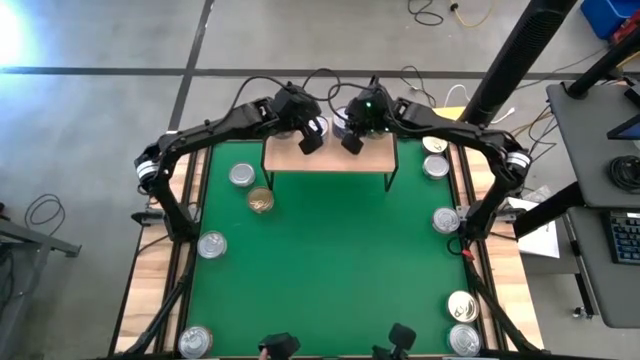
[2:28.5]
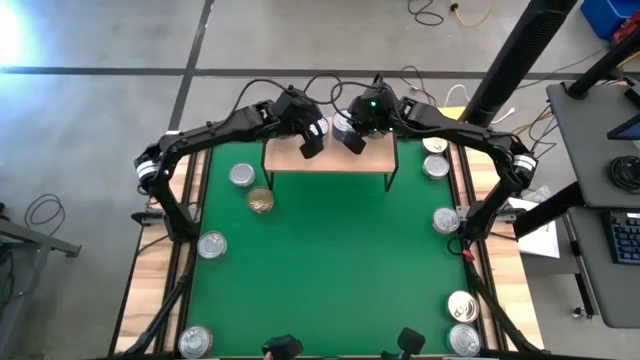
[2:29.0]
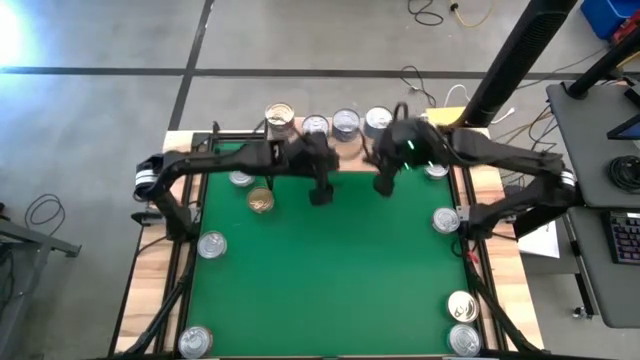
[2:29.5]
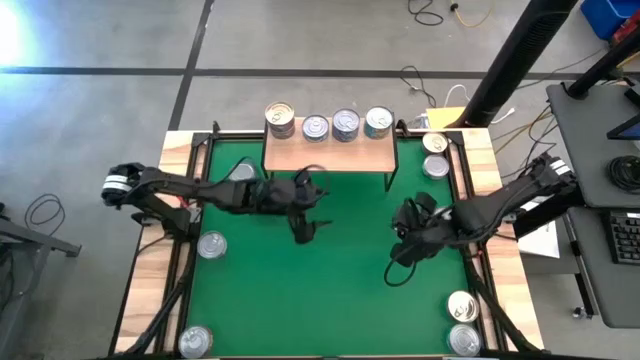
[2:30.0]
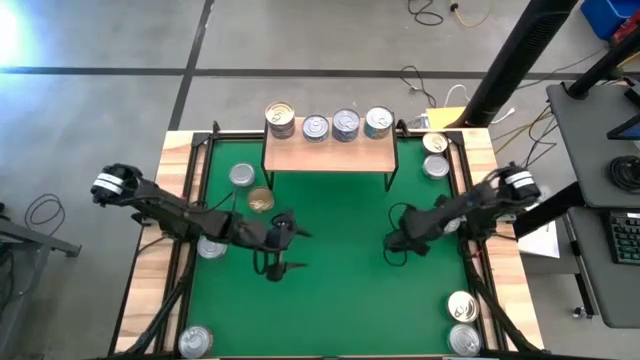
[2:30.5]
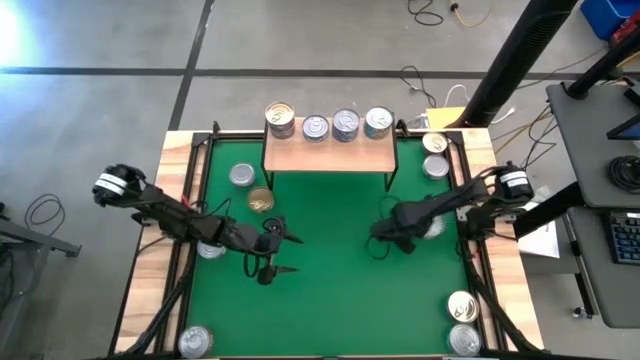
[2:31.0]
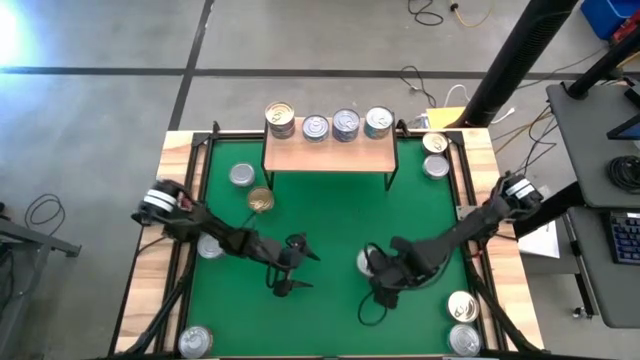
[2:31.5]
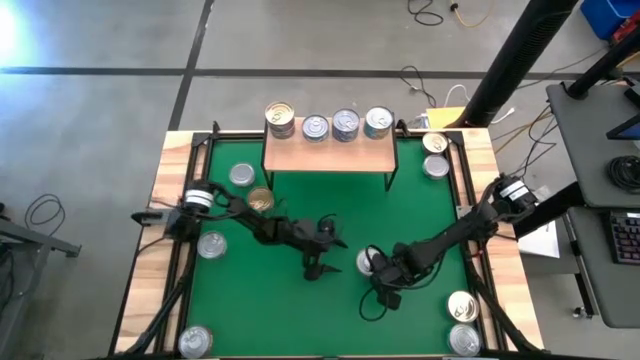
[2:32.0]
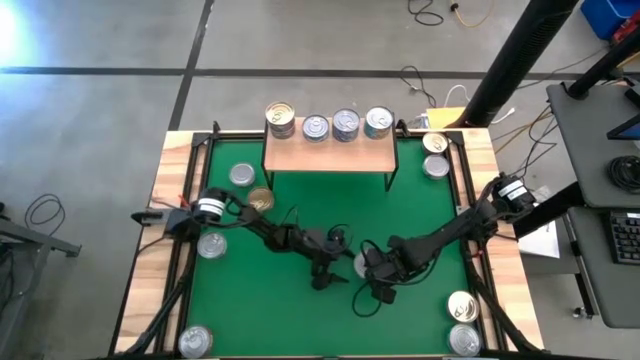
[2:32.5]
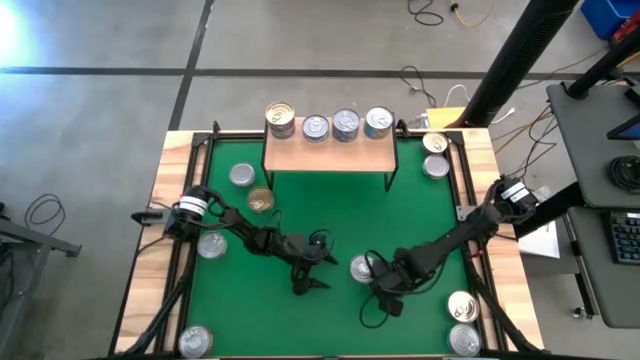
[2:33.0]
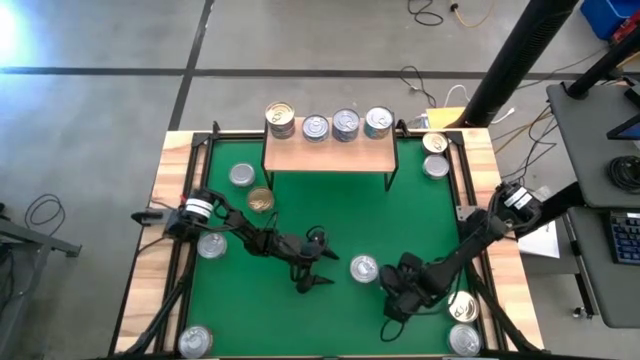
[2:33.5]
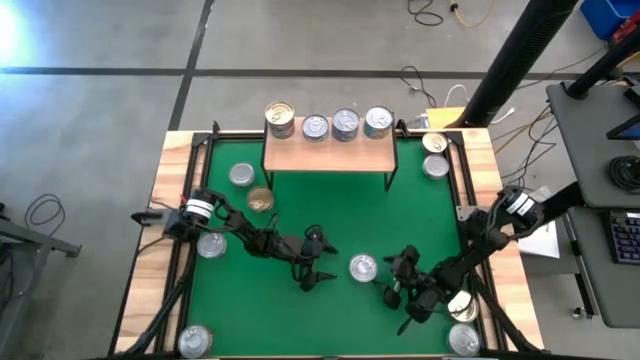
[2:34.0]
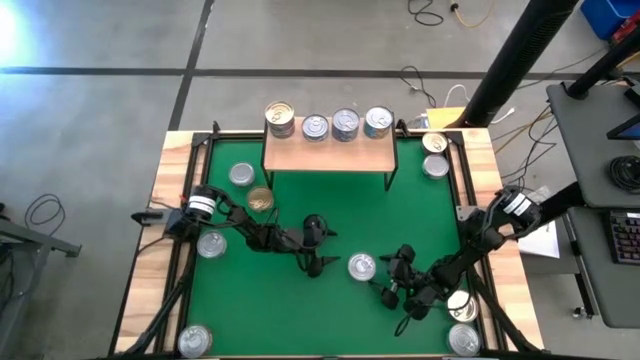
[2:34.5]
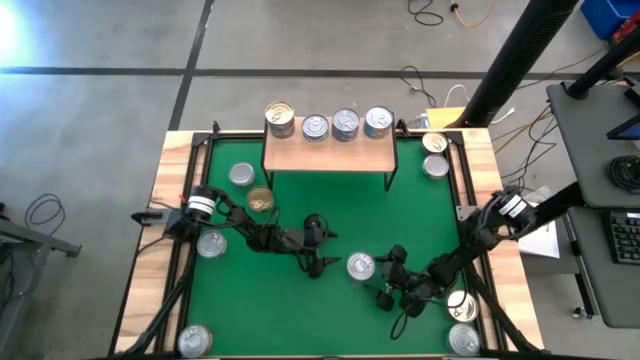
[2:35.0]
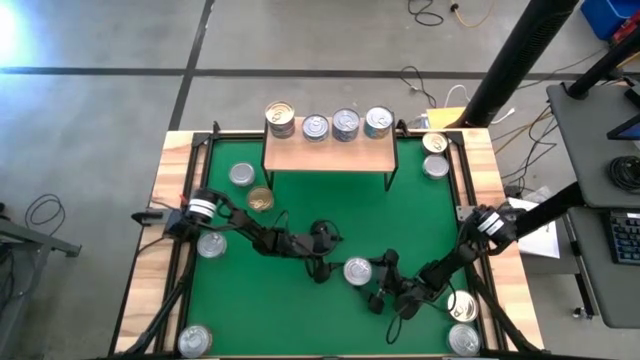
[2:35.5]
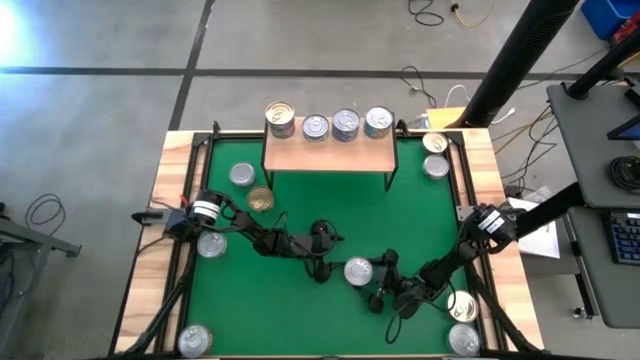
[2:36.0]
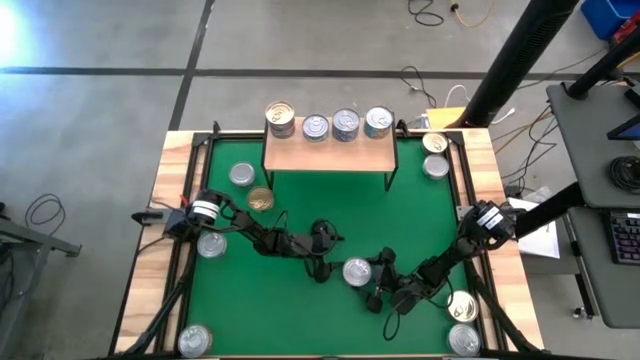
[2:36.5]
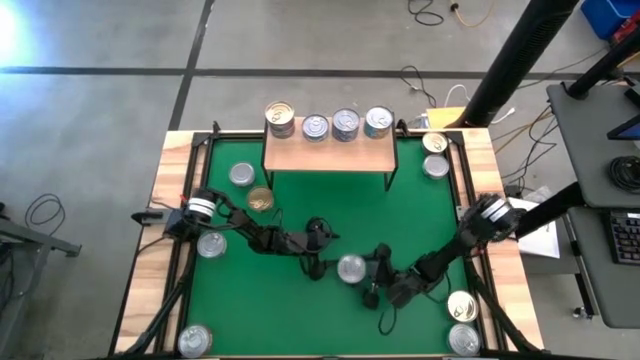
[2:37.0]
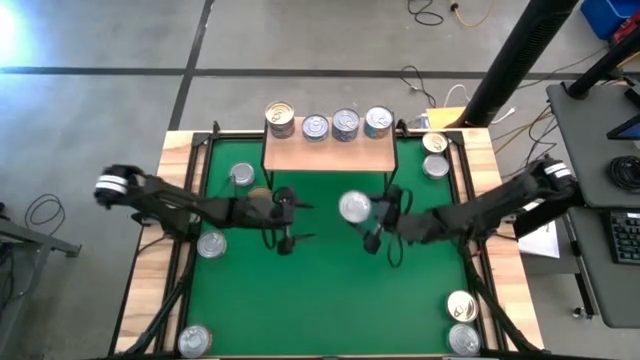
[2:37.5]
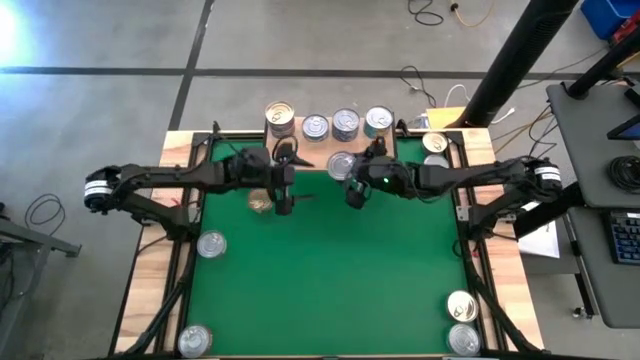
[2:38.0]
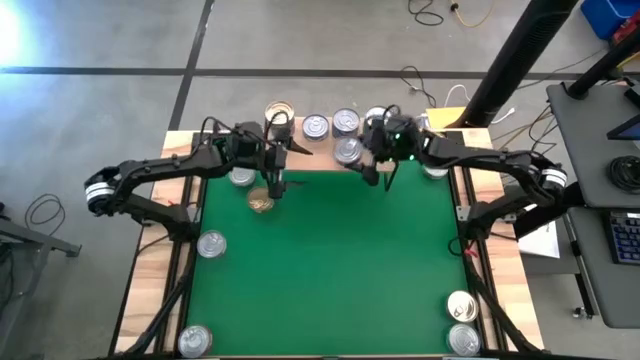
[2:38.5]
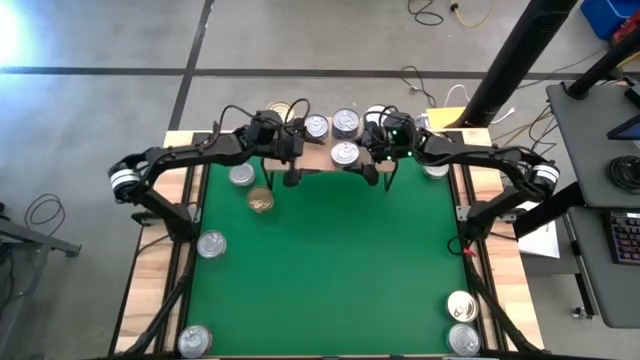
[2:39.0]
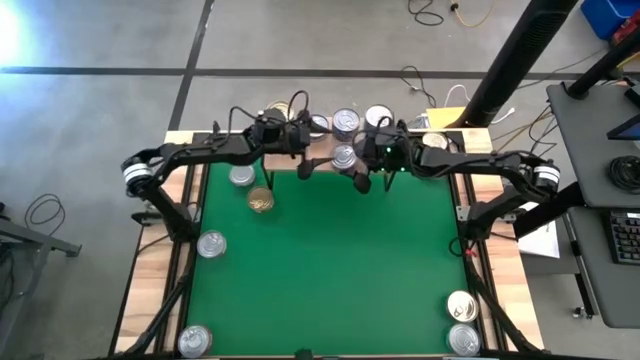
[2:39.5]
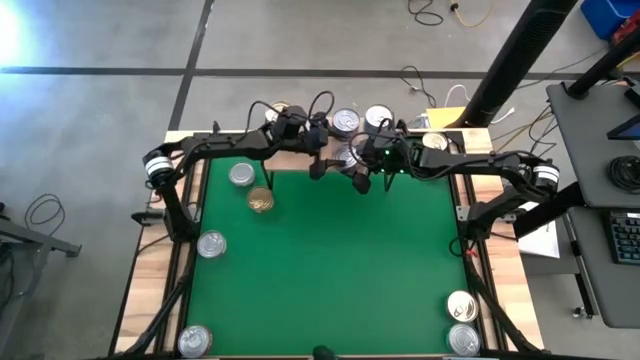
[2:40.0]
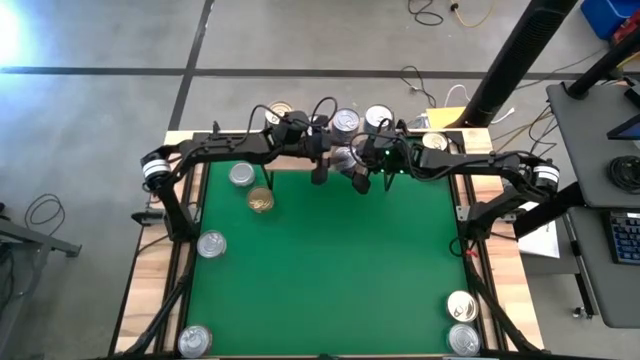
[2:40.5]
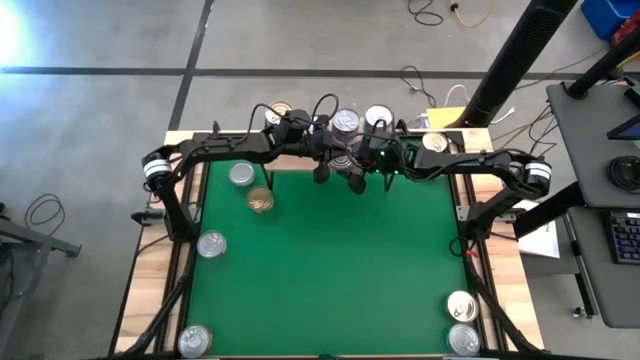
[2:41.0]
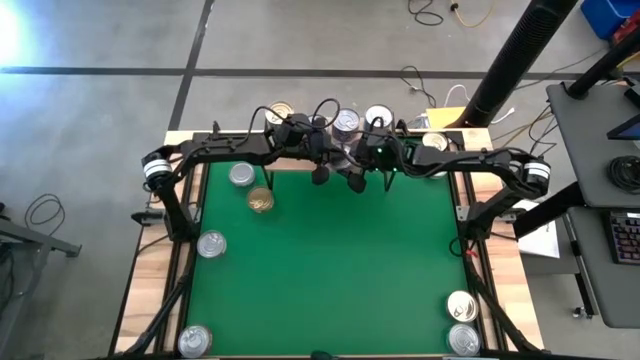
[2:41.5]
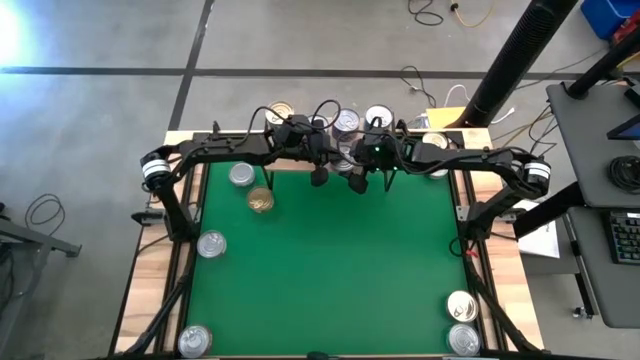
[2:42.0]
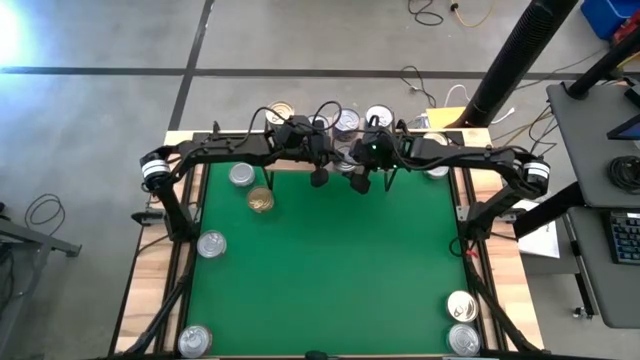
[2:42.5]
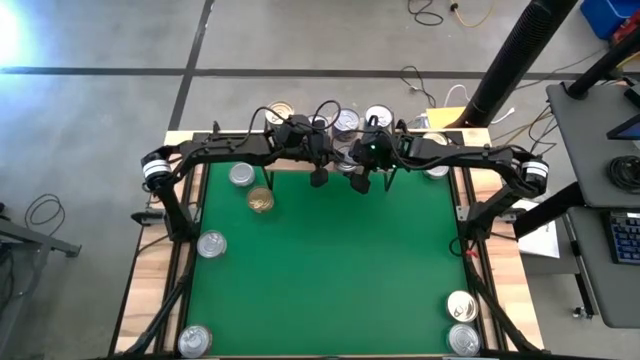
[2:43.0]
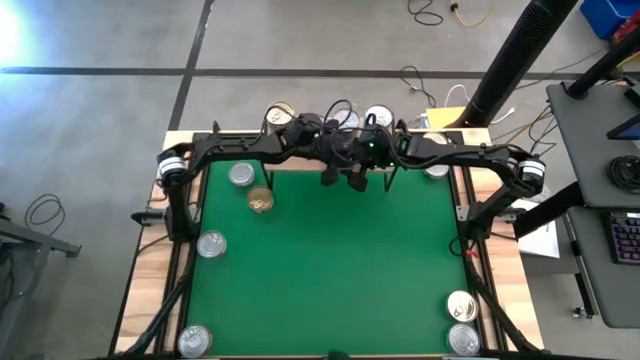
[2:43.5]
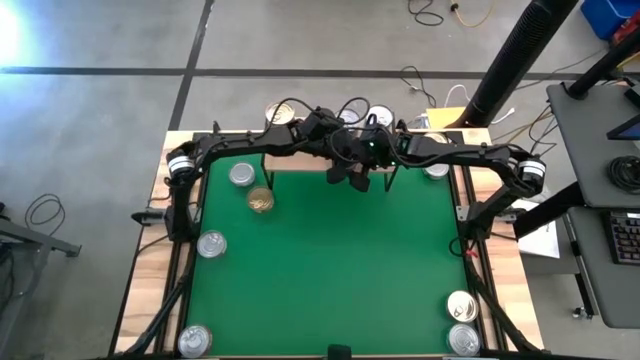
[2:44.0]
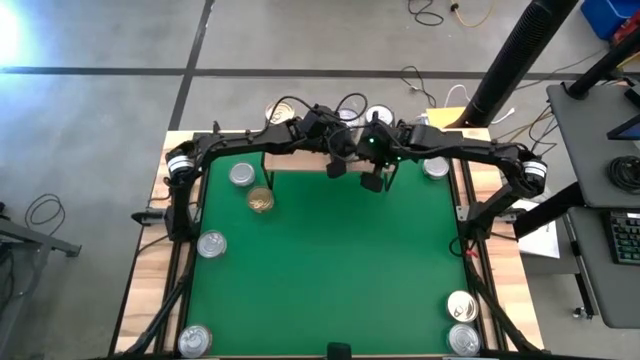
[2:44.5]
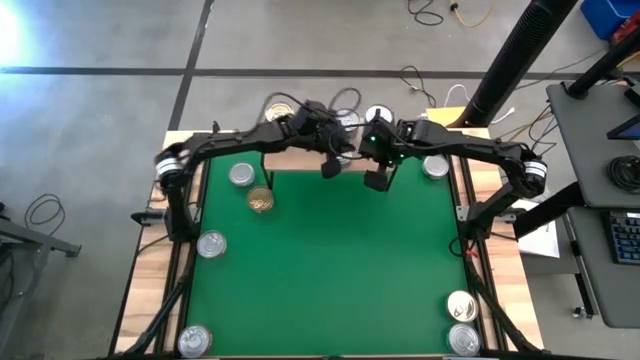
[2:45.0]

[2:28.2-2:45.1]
Task: Stack canned seafood by type on shelf
Put the top red tuna can on the shelf

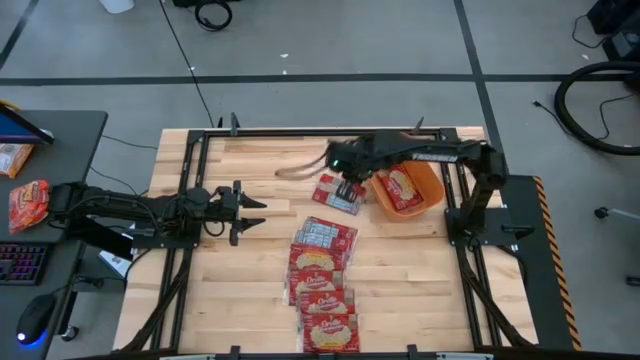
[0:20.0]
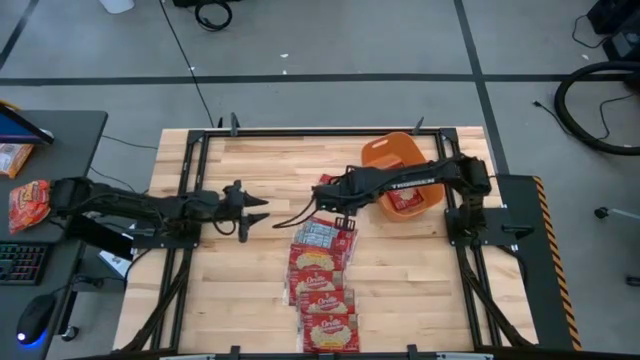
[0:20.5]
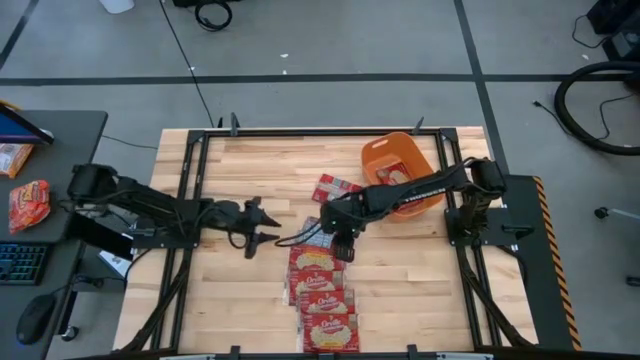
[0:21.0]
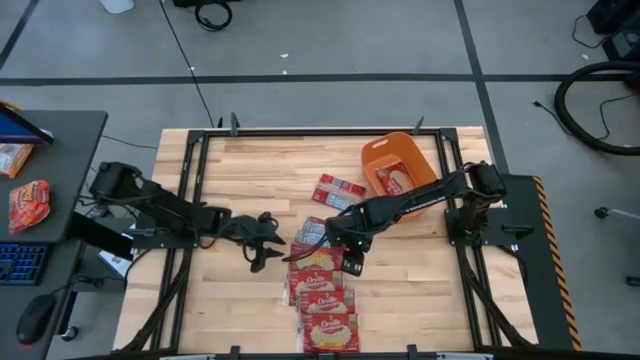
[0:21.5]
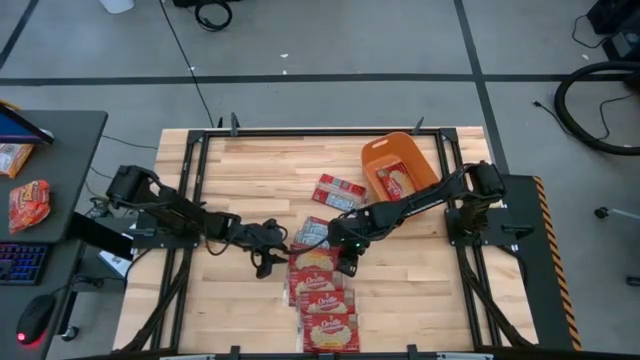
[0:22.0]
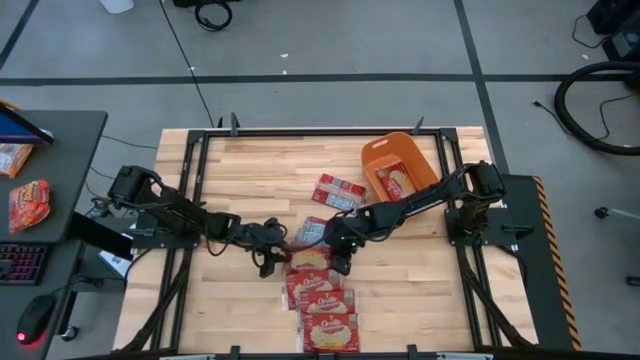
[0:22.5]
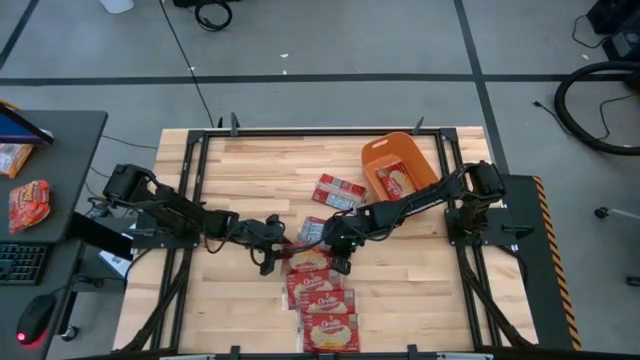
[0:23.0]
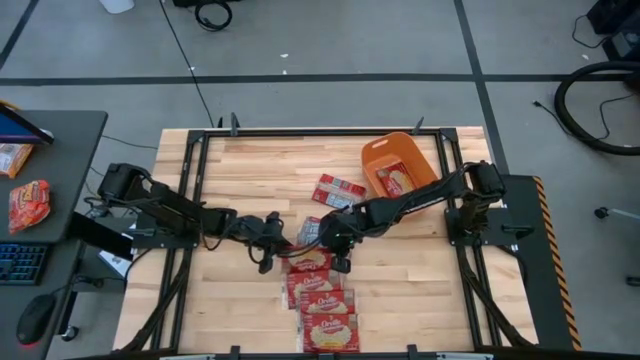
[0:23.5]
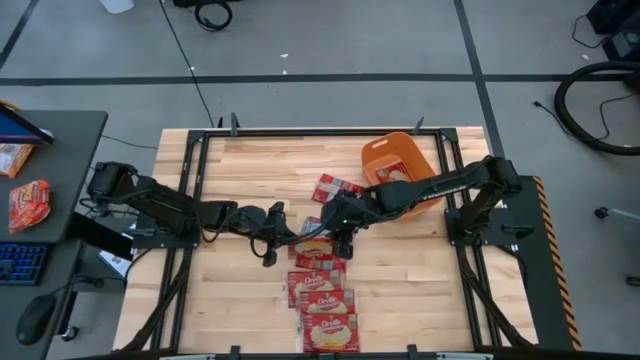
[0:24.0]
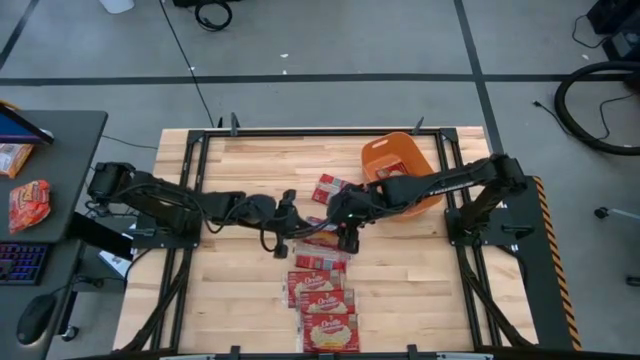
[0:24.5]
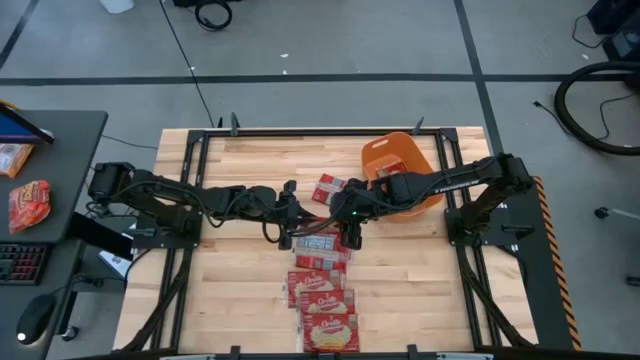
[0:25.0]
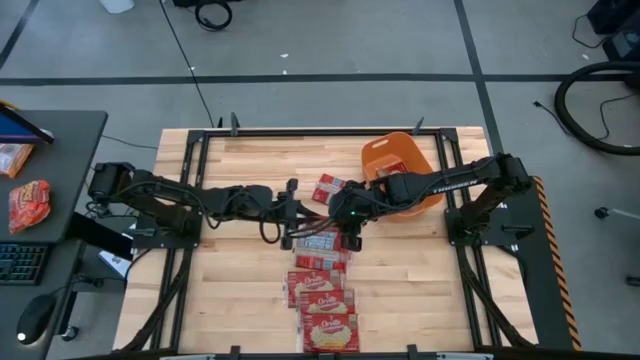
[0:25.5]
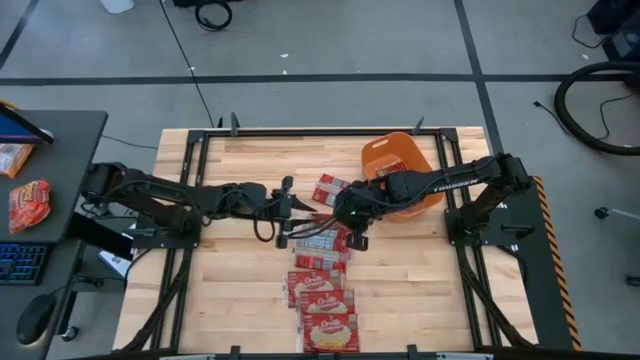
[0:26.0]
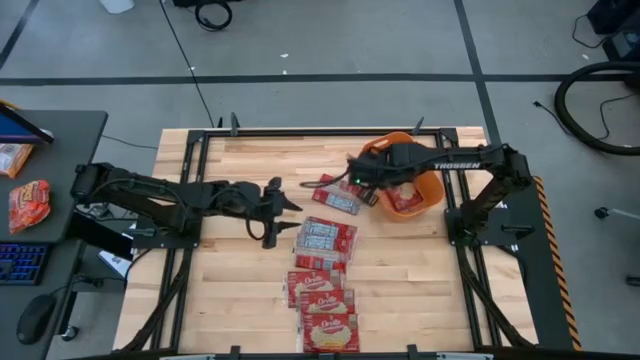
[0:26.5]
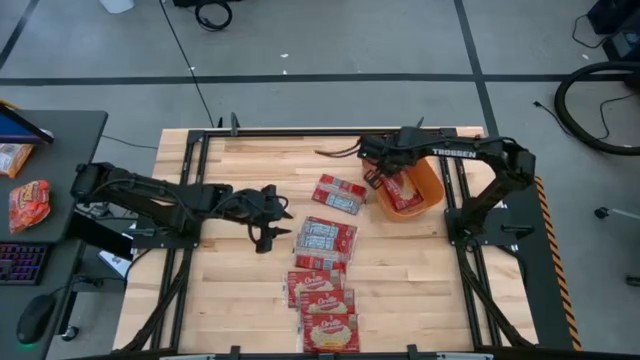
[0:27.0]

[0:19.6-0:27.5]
Task: Sort popcorn bags into baskets
Put the red popcorn bag into the orange bin
